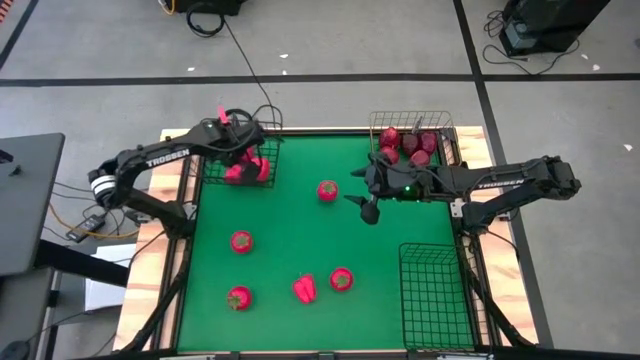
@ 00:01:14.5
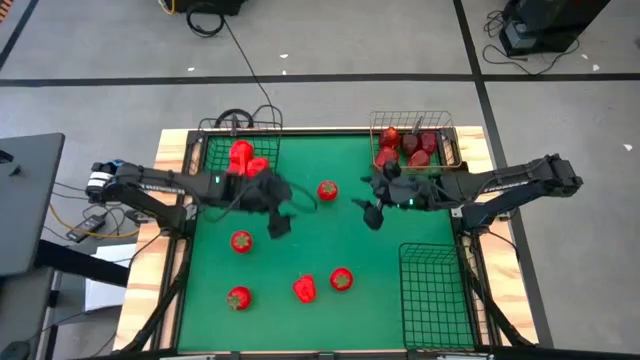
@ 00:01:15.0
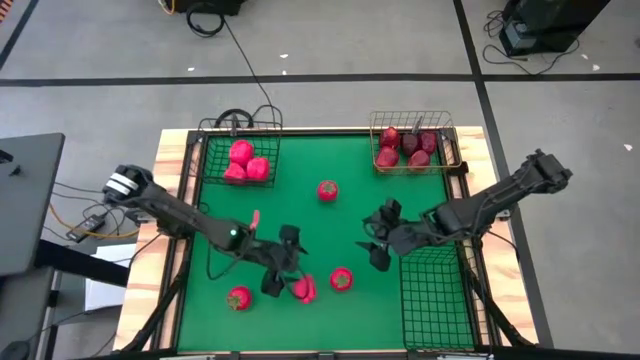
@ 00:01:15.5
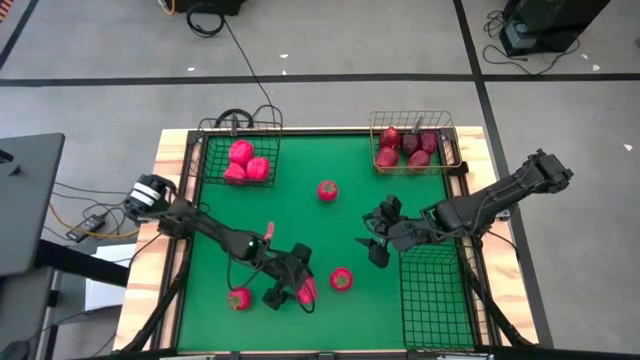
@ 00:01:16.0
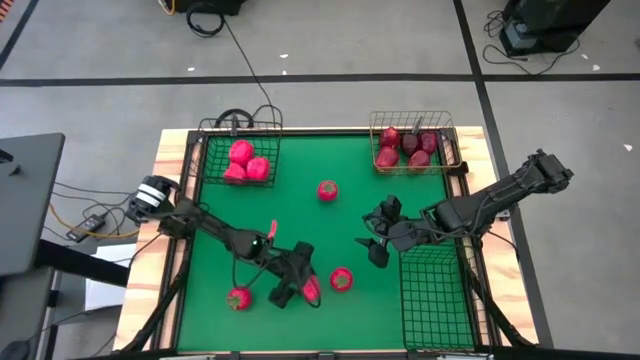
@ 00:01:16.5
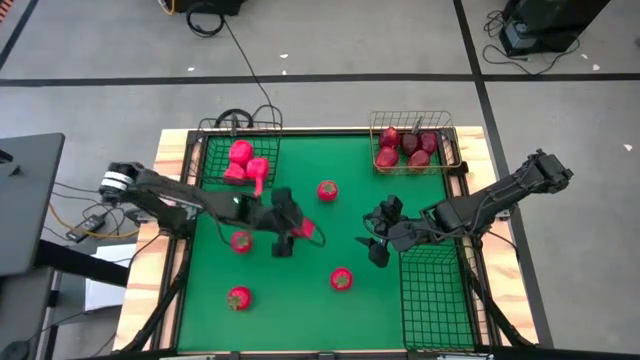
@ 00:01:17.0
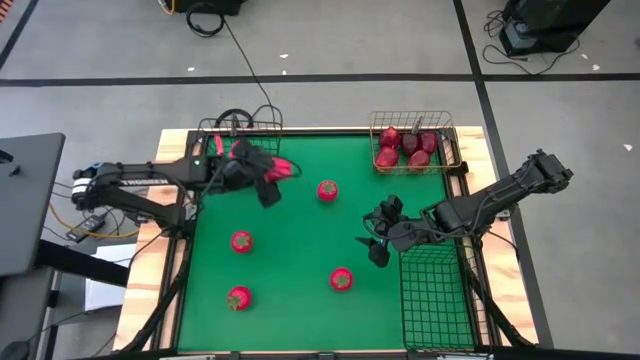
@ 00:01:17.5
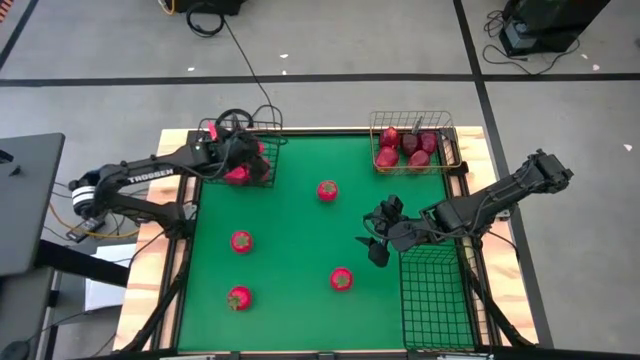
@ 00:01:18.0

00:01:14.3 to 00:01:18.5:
Task: Sort produce into baskets
Put the red bell pepper into the top black wire basket

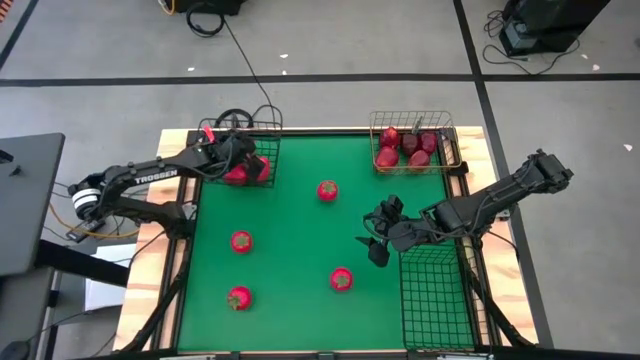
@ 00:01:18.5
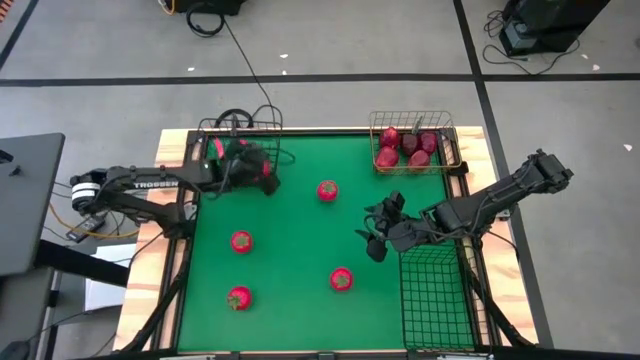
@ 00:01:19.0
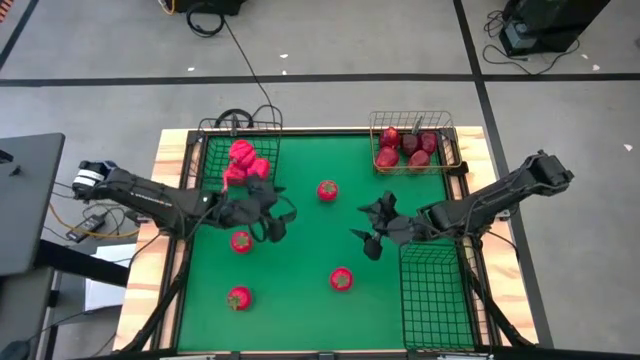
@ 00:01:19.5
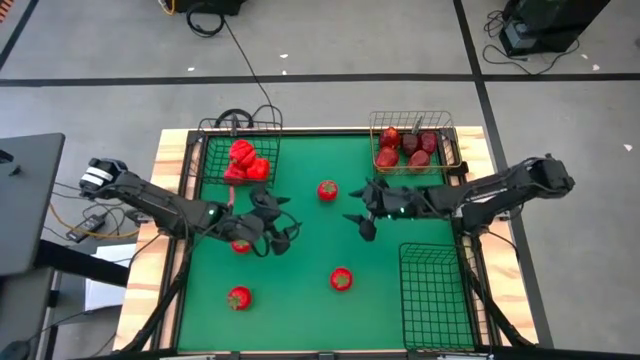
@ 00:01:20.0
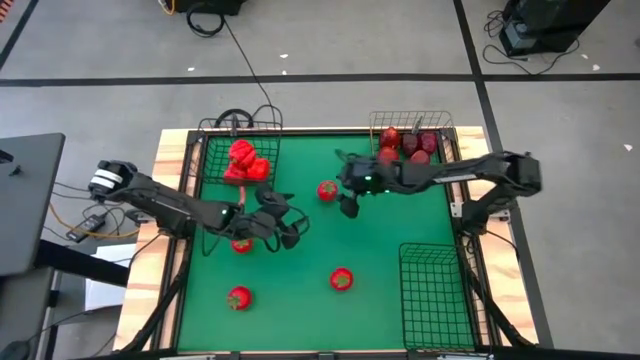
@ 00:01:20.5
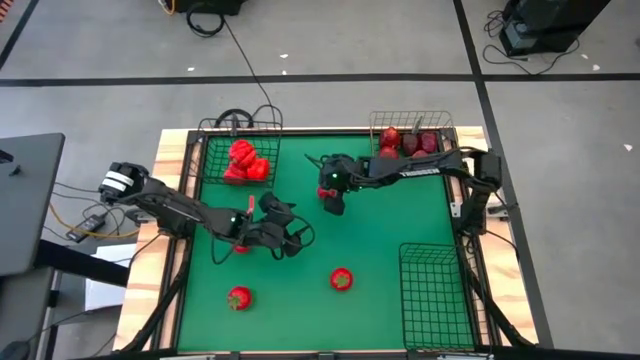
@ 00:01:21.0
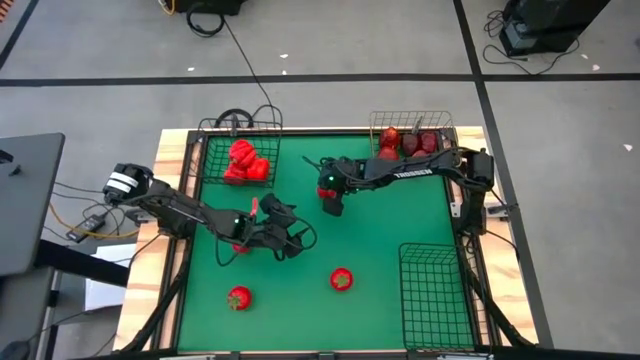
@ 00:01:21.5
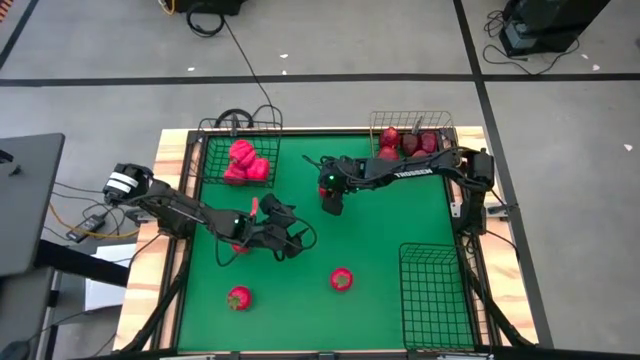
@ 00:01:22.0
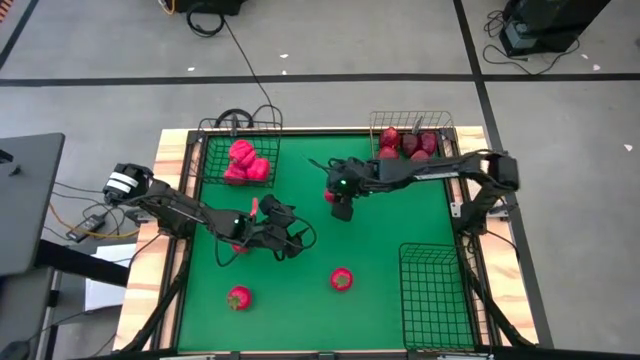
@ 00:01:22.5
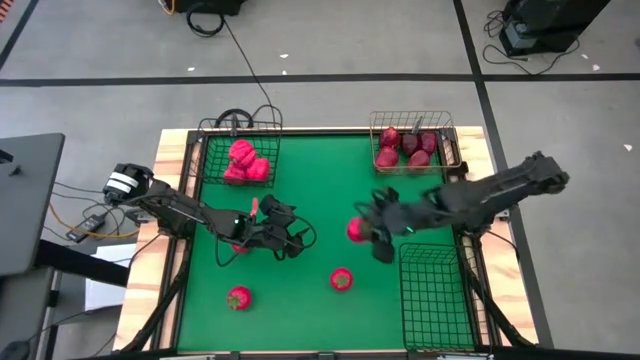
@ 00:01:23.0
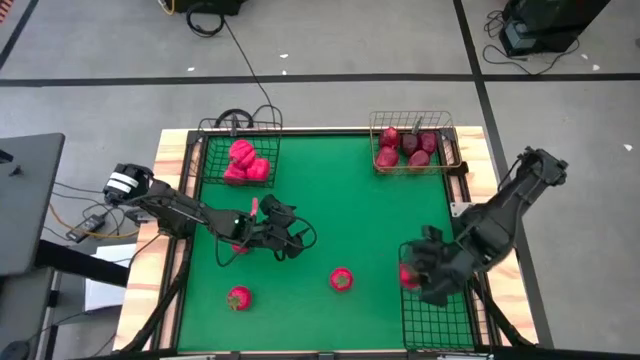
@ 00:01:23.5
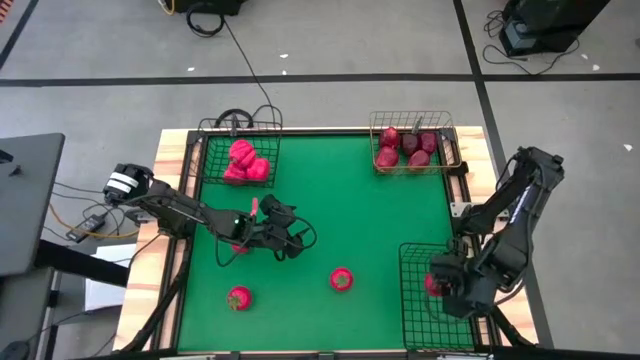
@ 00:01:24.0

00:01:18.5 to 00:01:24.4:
Put the red tomato into the bottom black wire basket

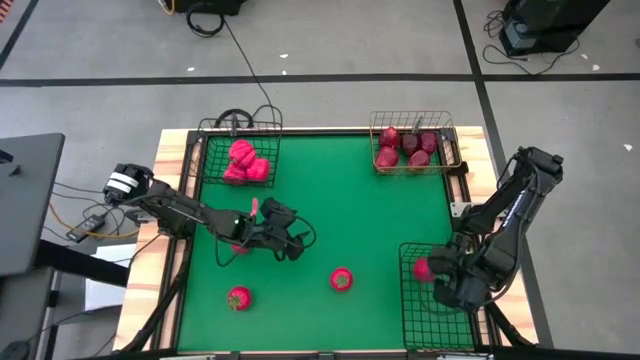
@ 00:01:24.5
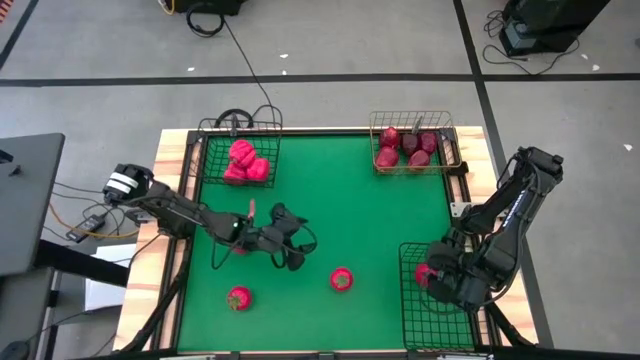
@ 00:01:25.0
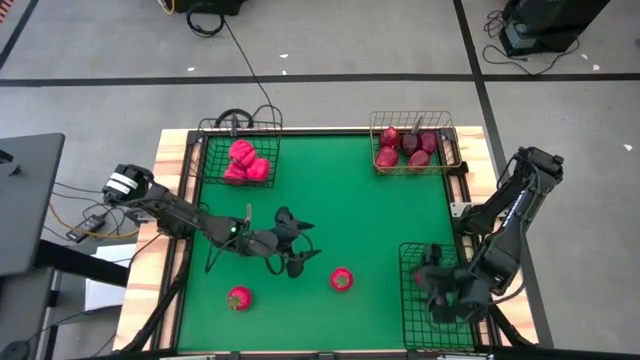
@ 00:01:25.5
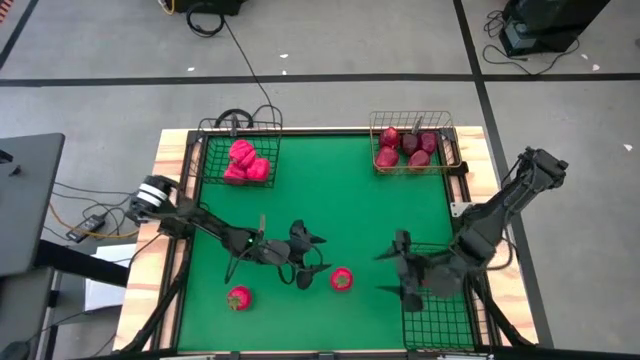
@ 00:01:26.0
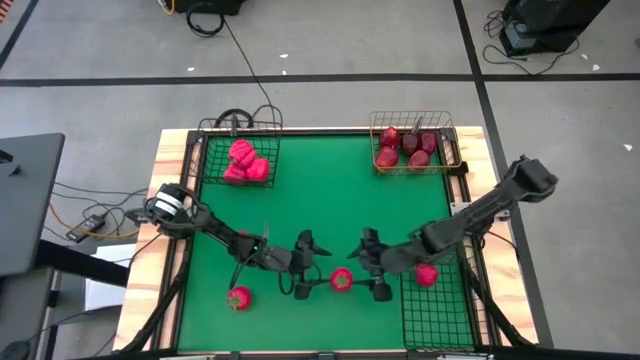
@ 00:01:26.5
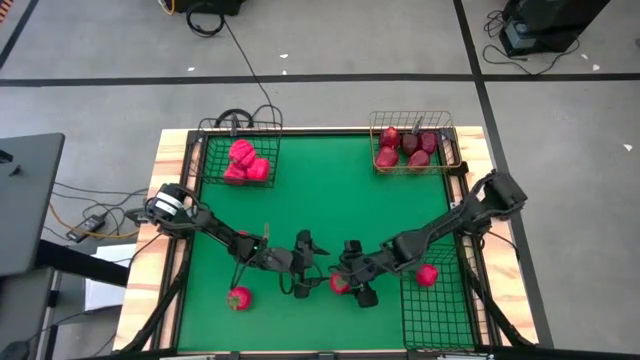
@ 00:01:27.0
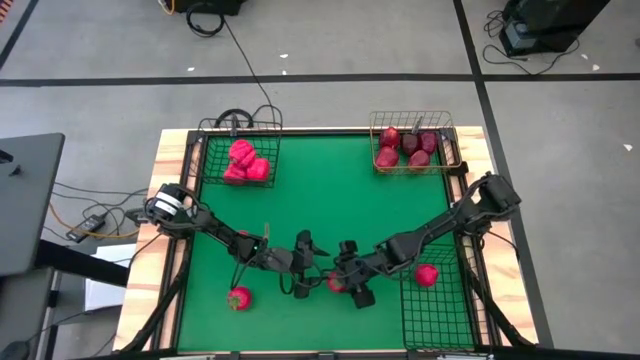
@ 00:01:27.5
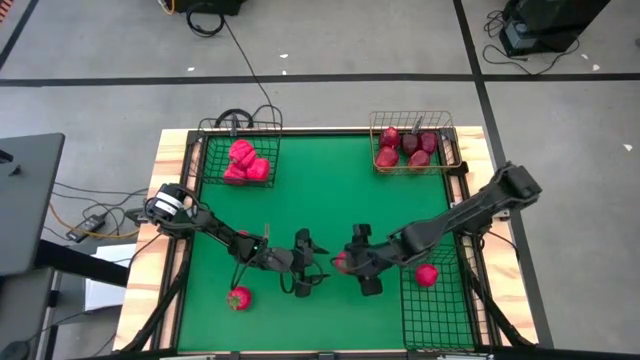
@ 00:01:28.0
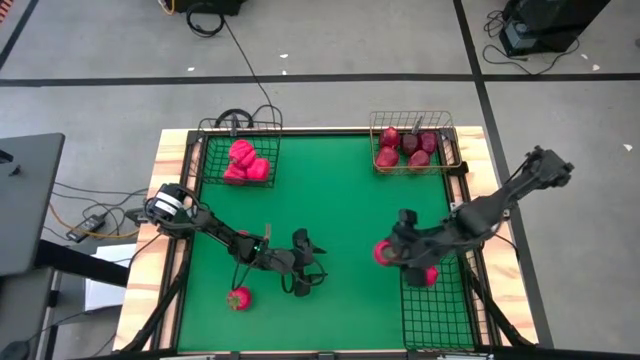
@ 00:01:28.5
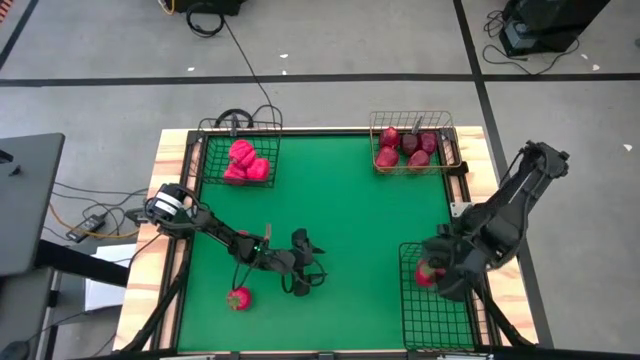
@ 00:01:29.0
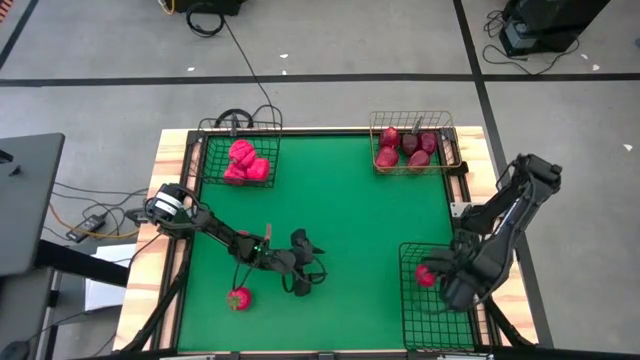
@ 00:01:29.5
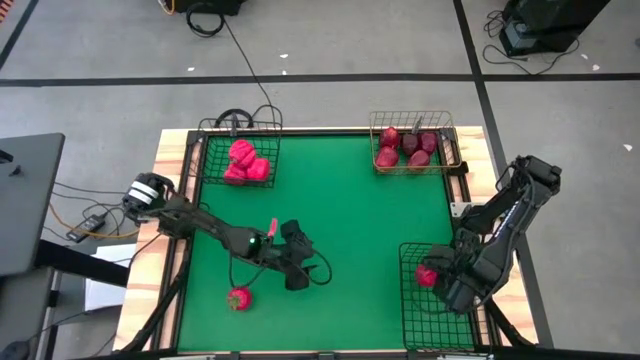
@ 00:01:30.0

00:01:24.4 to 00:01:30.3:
Put the red tomato into the bottom black wire basket

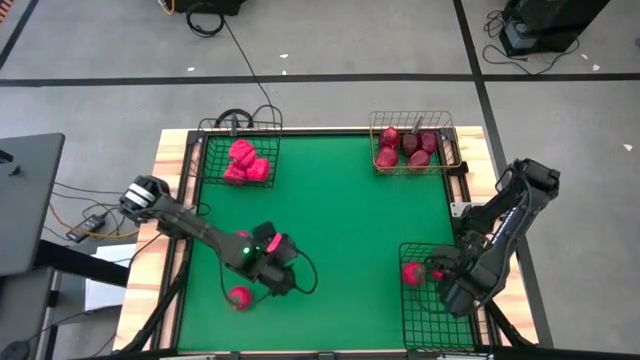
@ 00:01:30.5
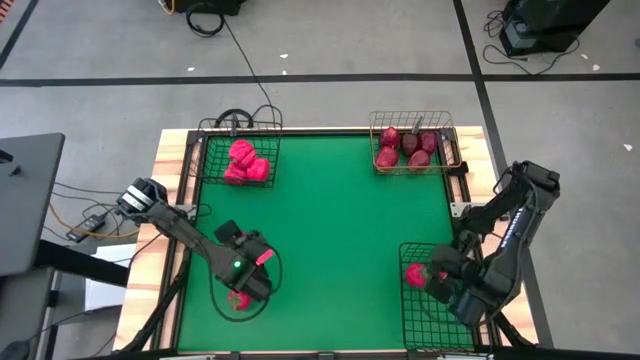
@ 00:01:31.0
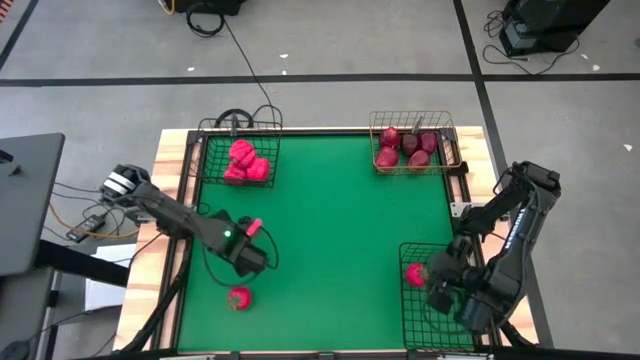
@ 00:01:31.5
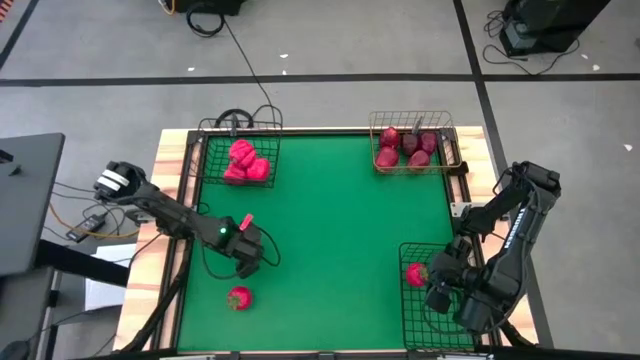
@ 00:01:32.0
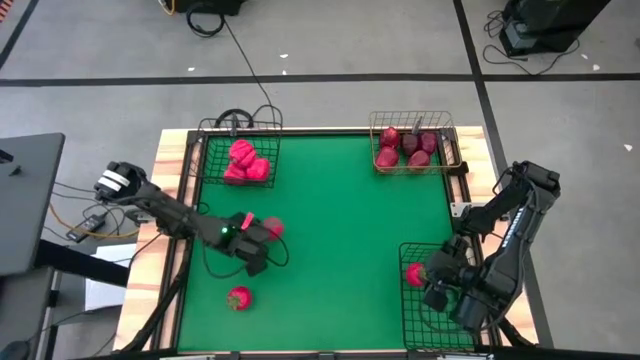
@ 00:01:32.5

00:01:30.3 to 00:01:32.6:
Put the red tomato into the bottom black black wire basket

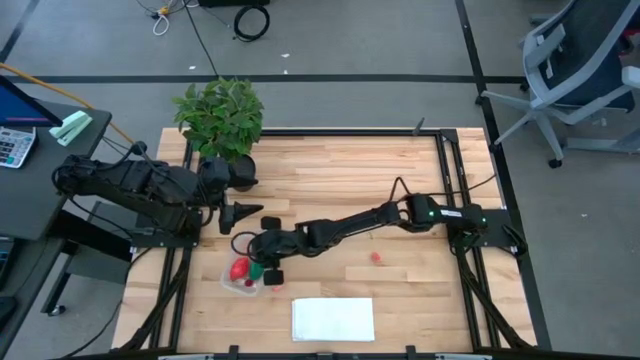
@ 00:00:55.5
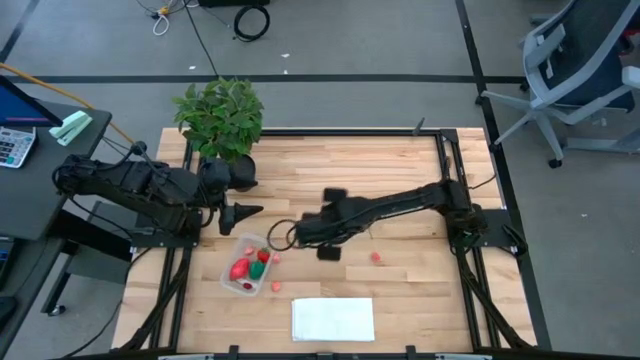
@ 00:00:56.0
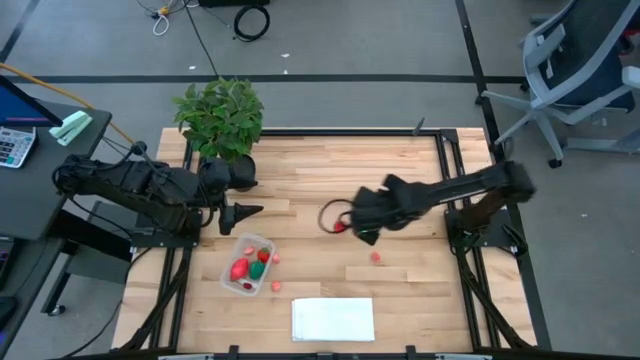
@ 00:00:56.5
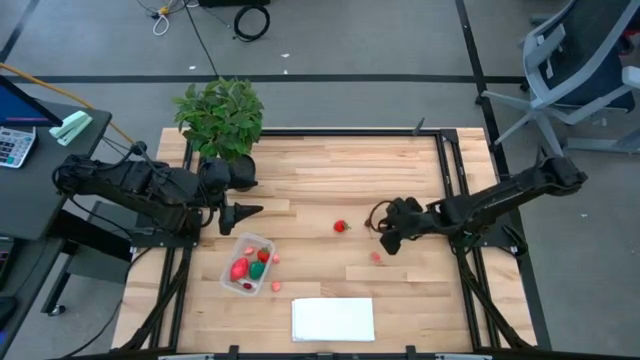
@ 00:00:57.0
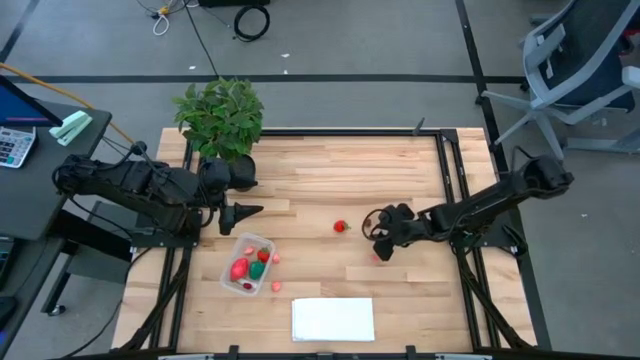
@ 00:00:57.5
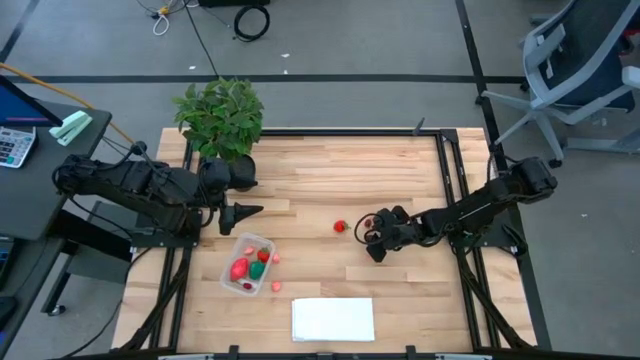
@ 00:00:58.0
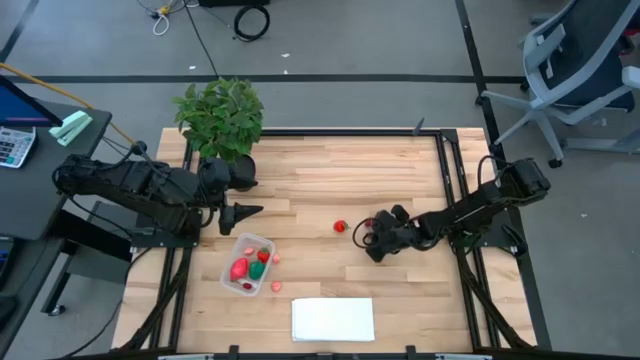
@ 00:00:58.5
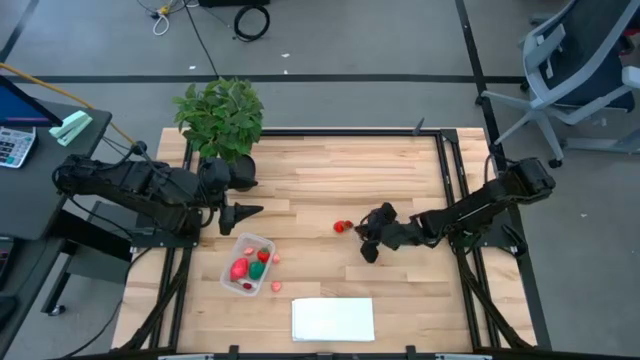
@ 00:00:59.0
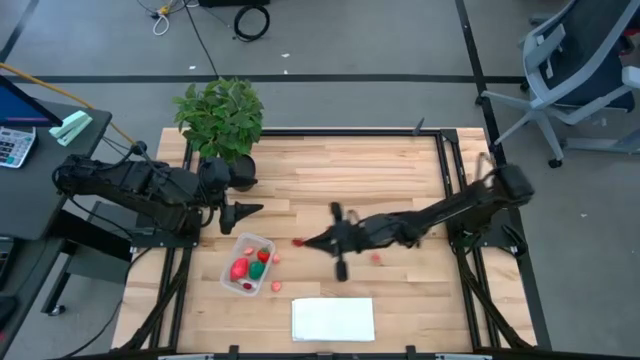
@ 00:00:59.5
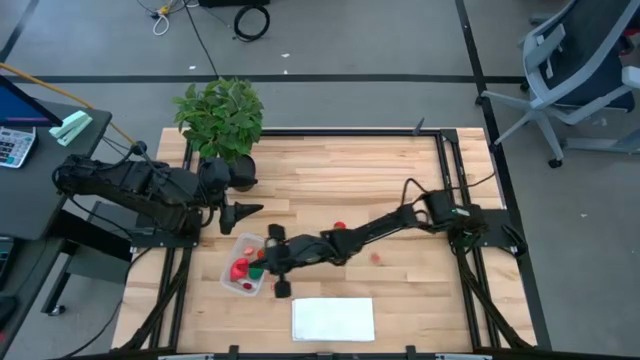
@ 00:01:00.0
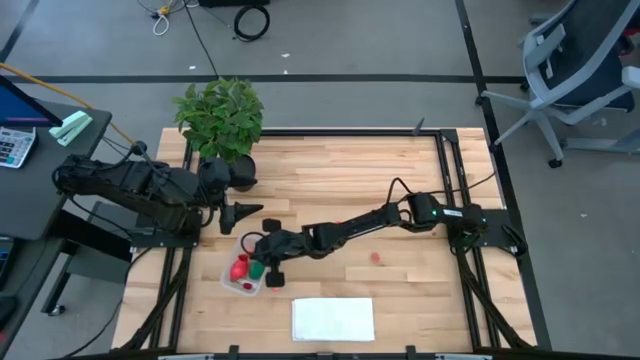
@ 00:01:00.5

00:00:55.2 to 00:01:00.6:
Task: Pick and placing Produce into tupperware
Put the red cherry into the transparent bin
